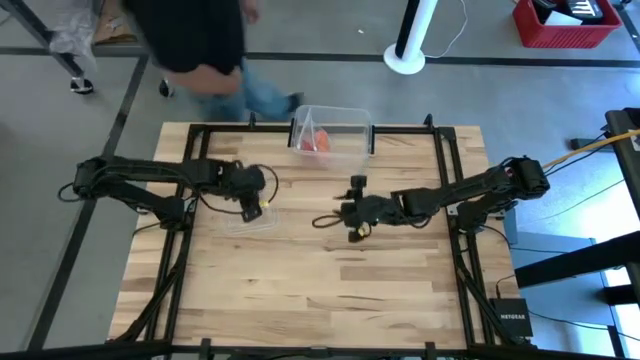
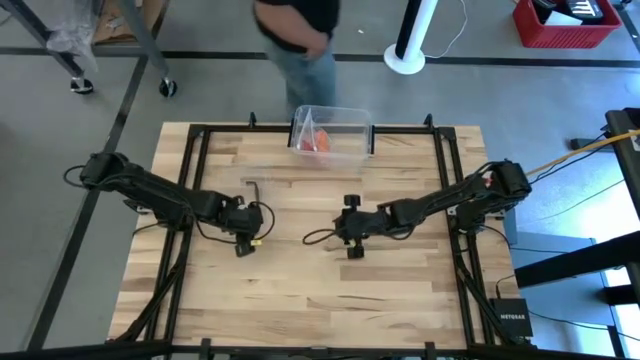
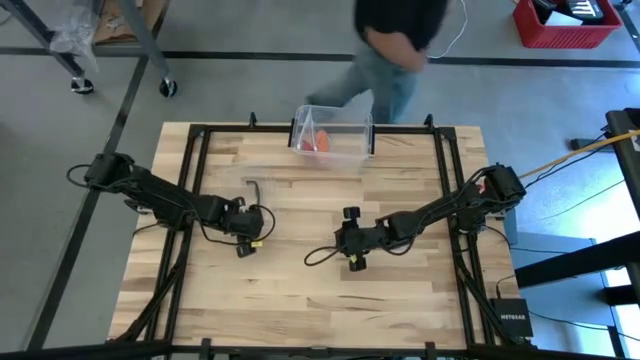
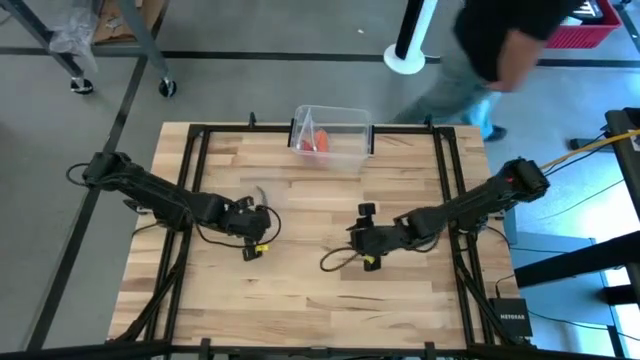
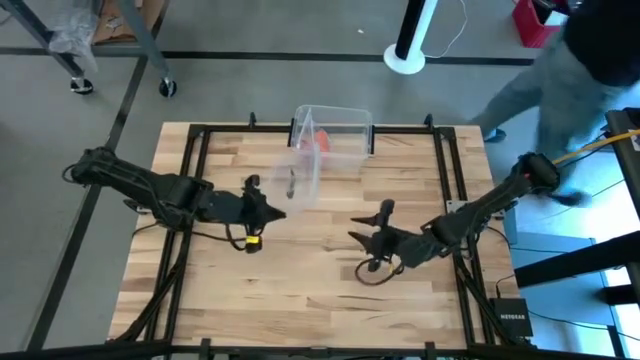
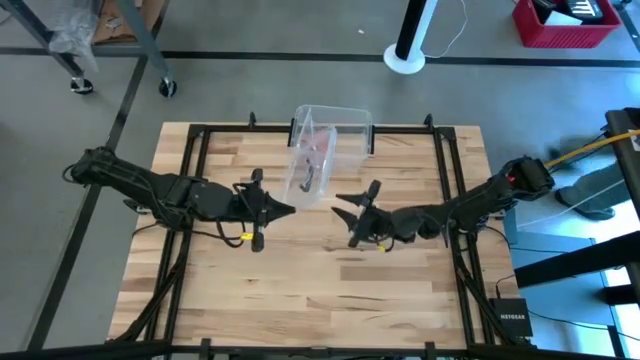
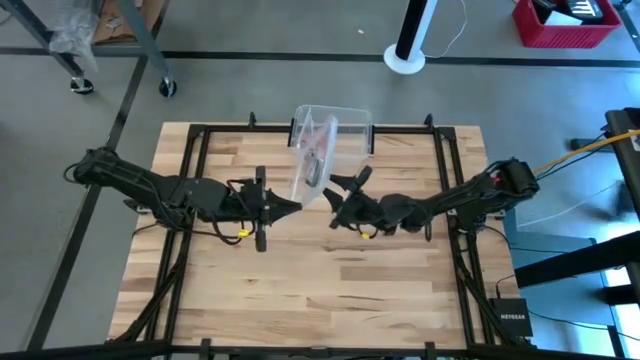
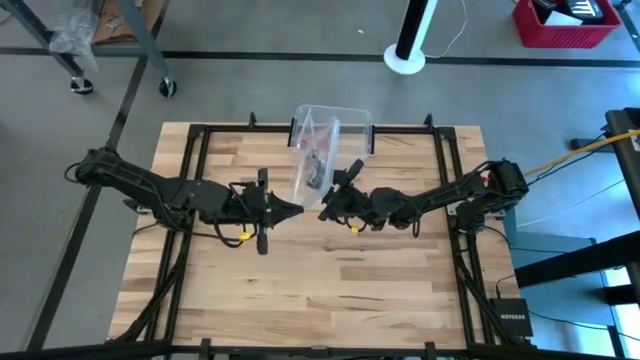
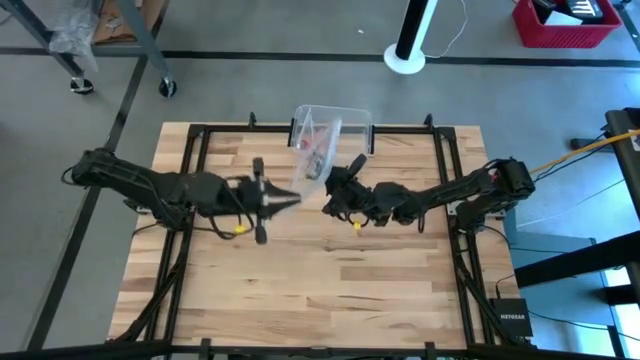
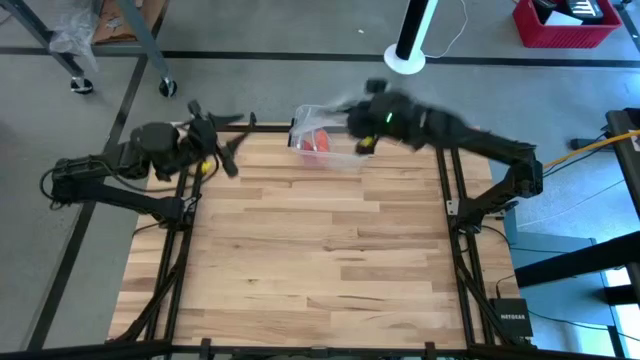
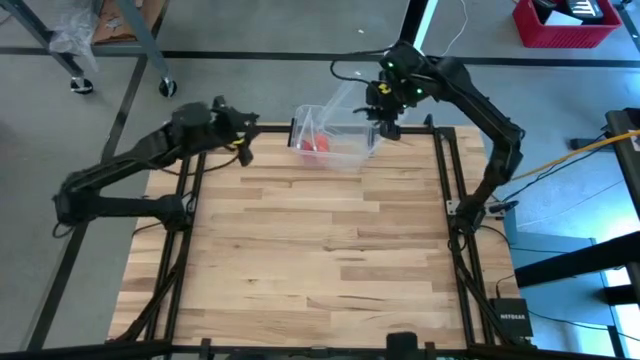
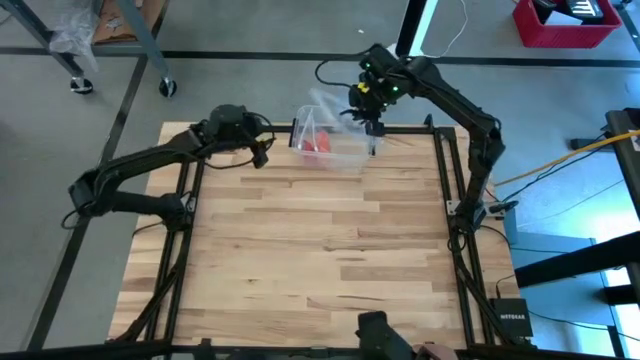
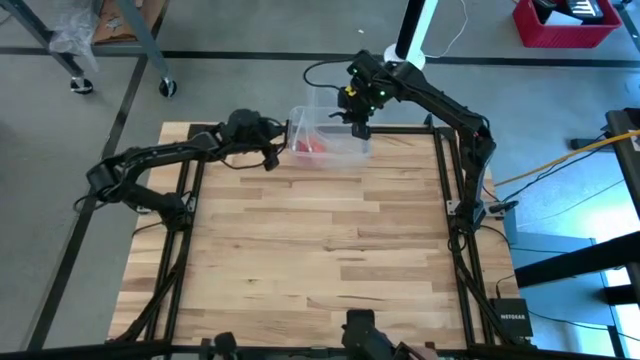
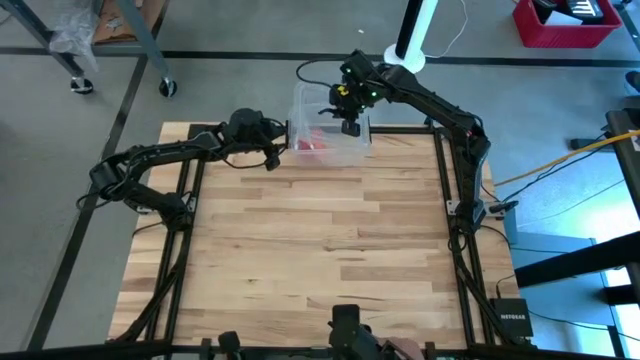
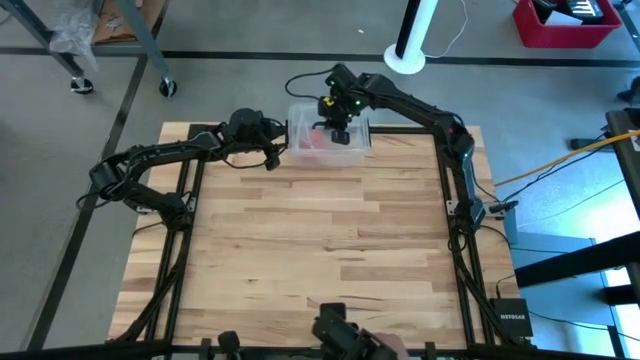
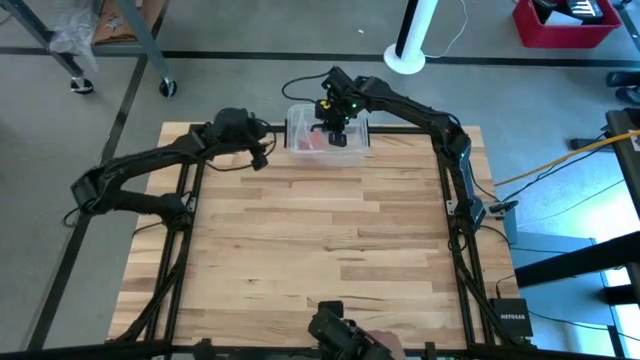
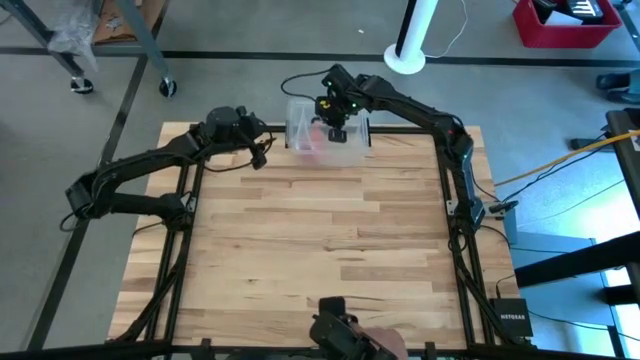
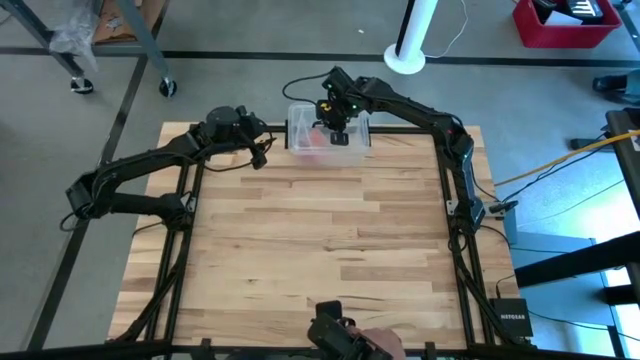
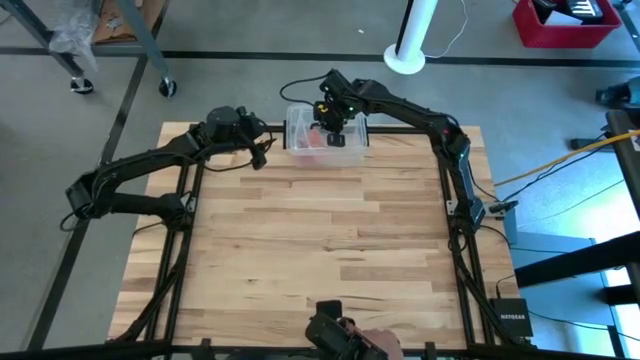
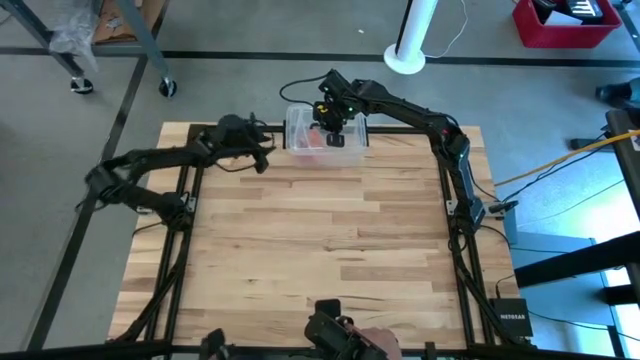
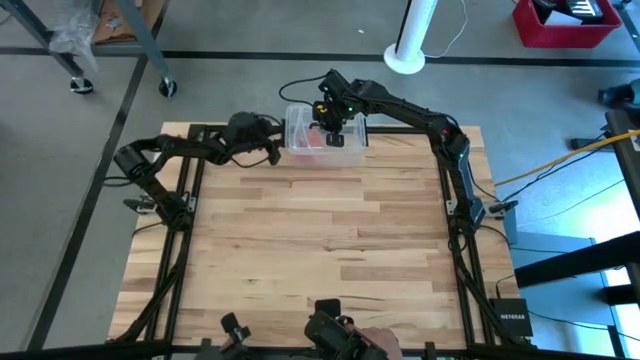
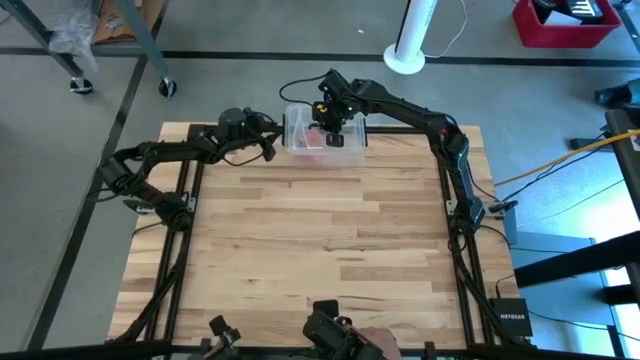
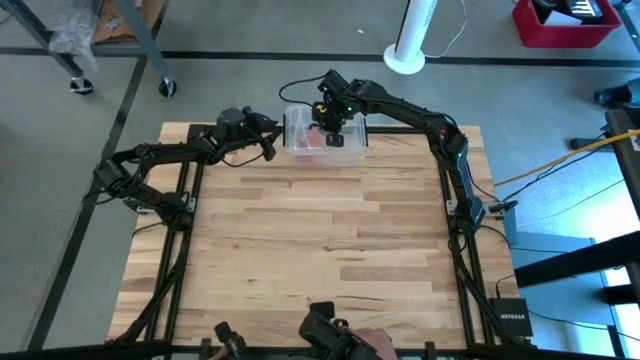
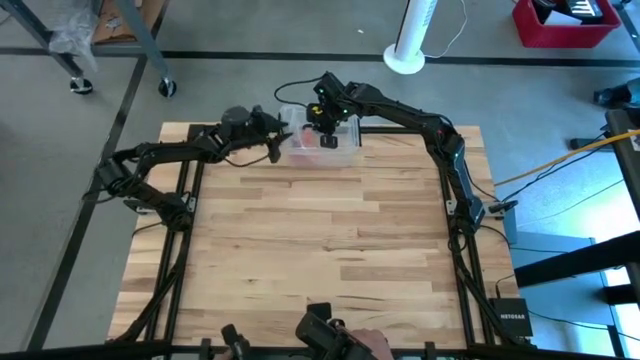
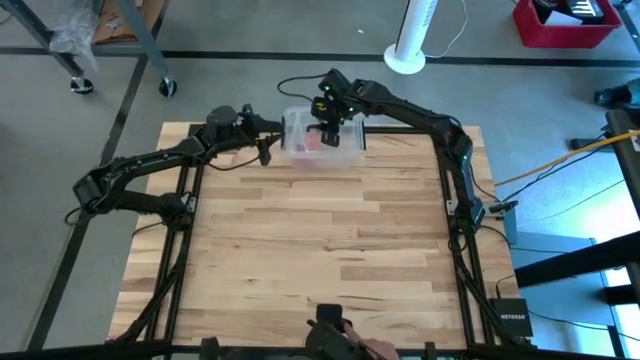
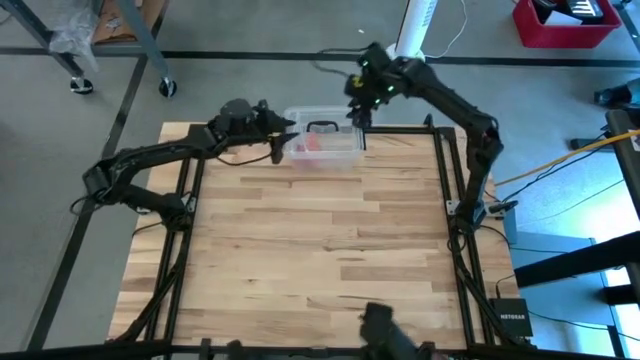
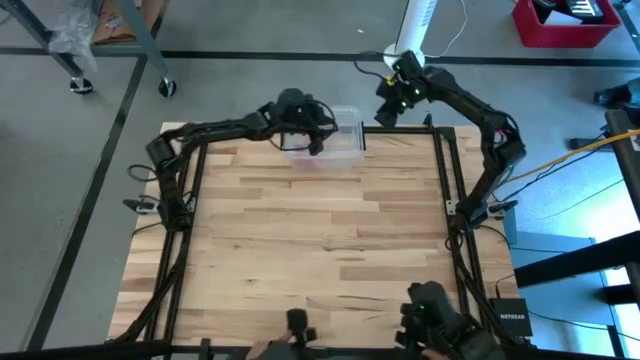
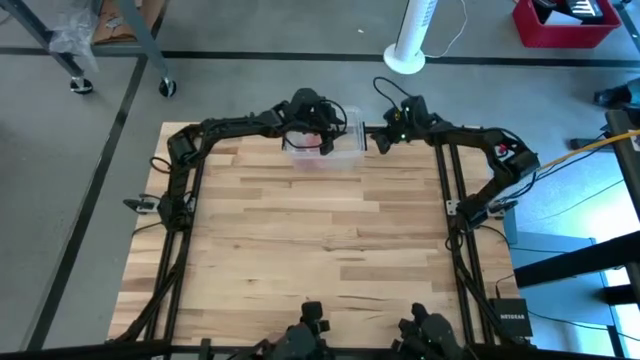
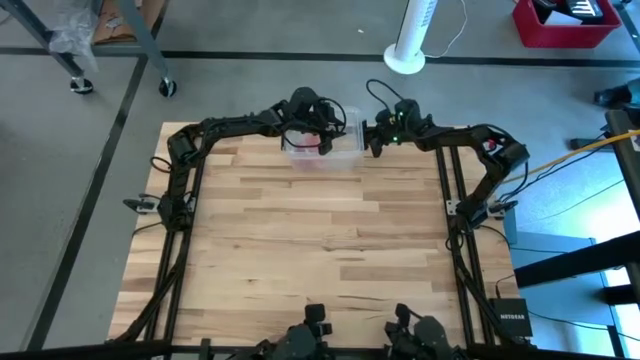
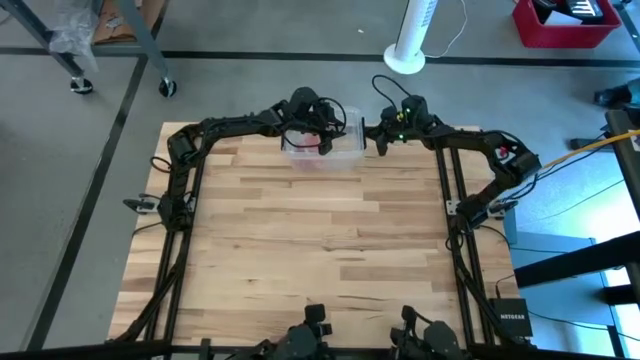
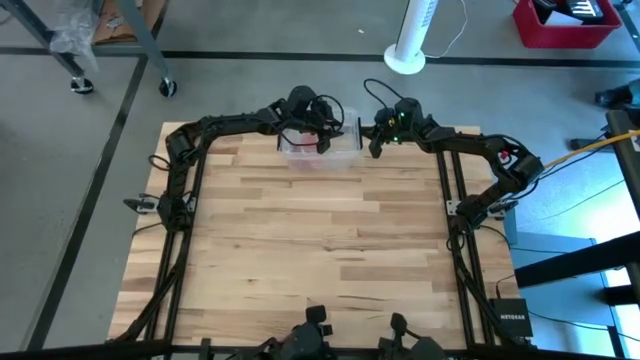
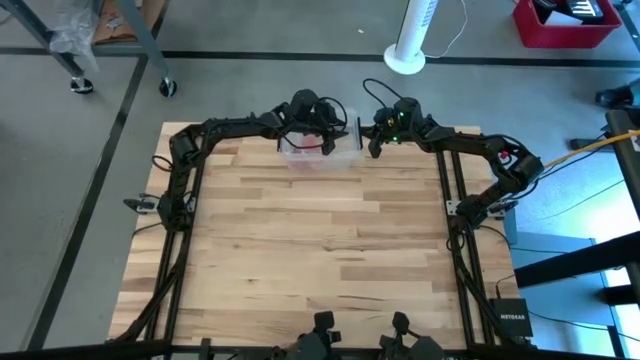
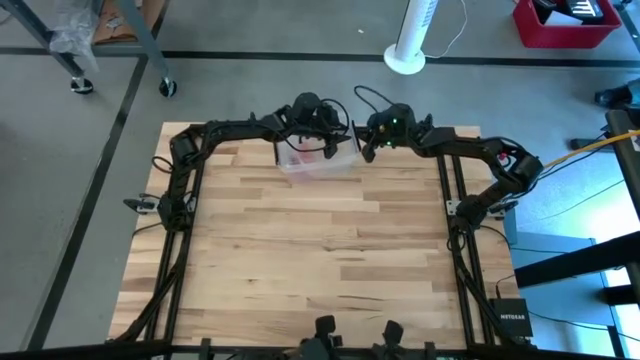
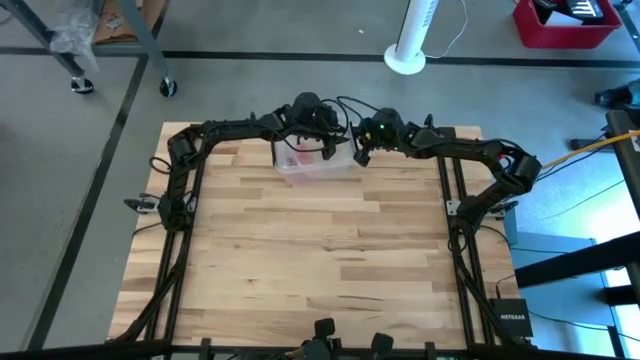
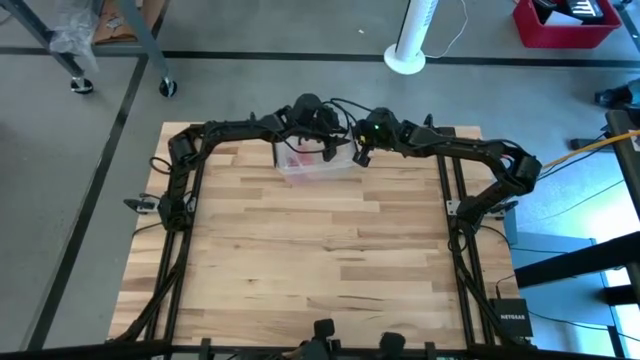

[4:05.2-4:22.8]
Task: Roll bandage
Close the transparent container

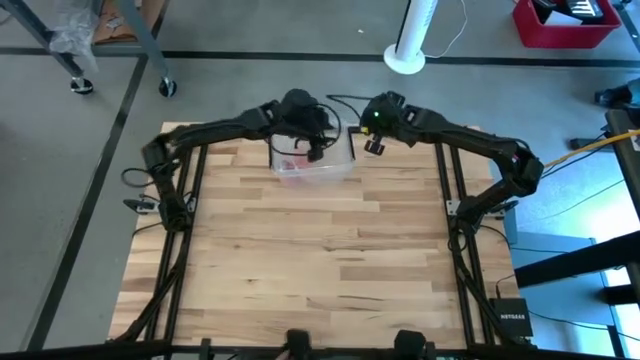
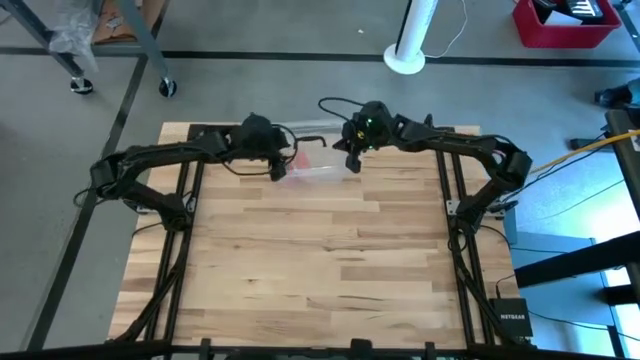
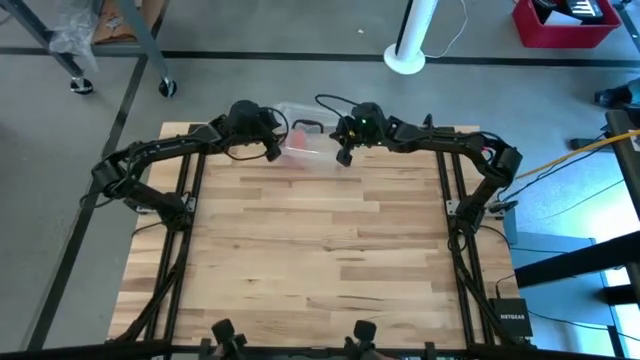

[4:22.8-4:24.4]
Adjust the transparent container

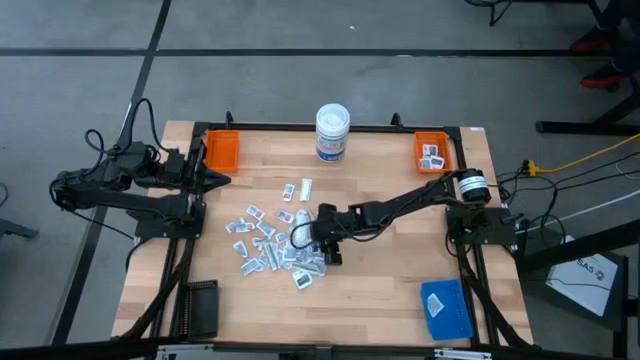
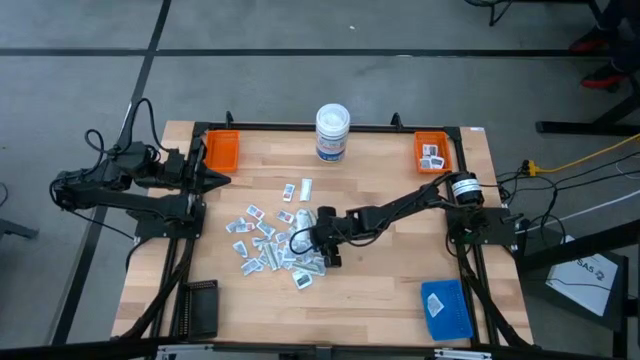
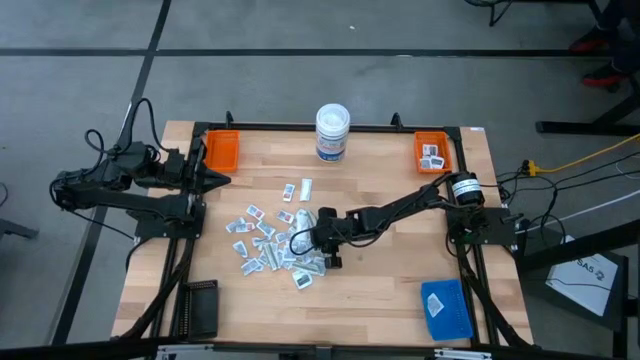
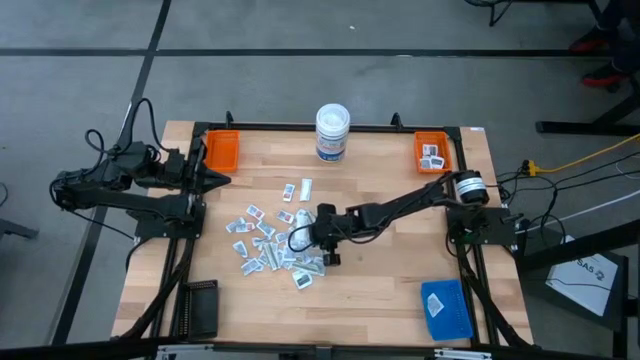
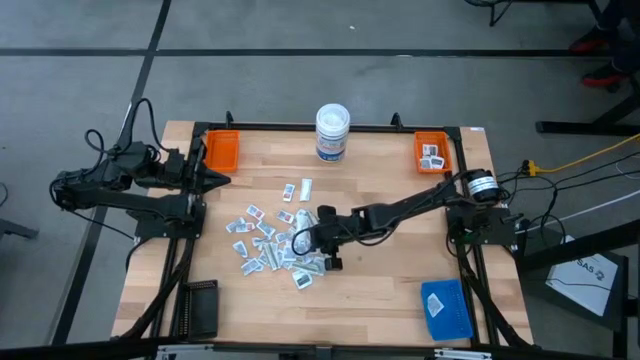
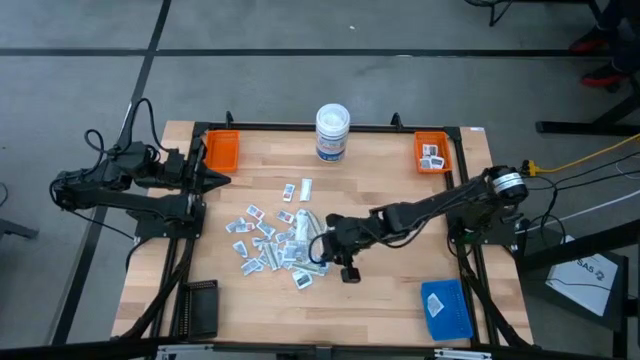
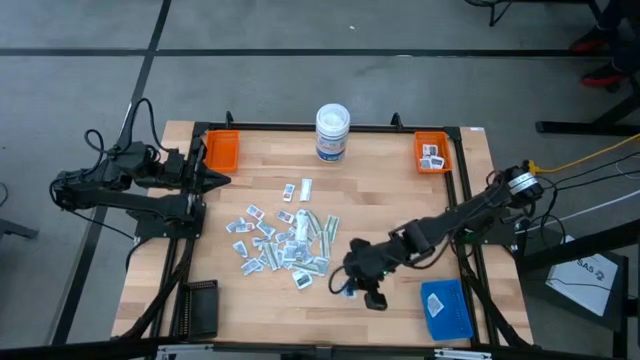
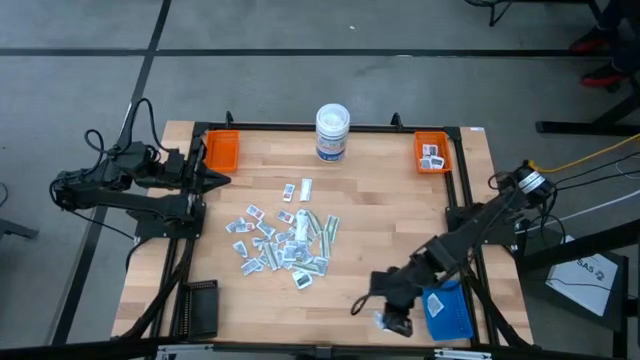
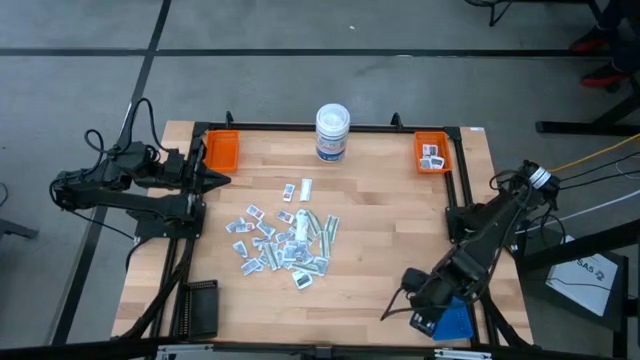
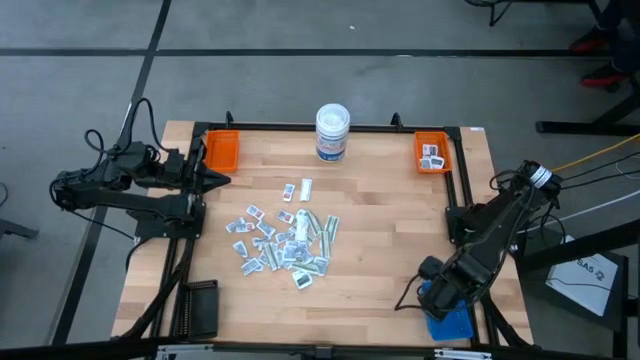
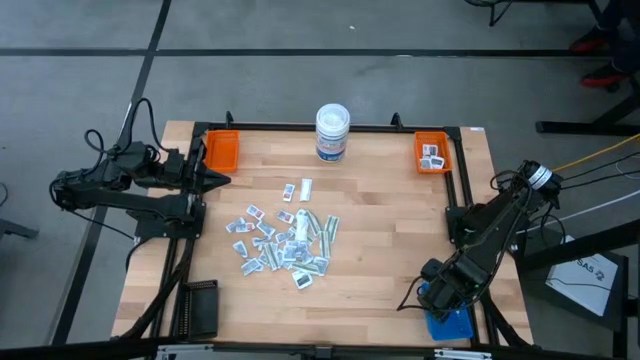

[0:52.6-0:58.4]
Task: Pick & Place First Aid Supplies
Put the blue alcohol pad into the blue bin
